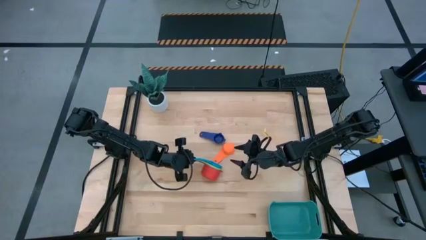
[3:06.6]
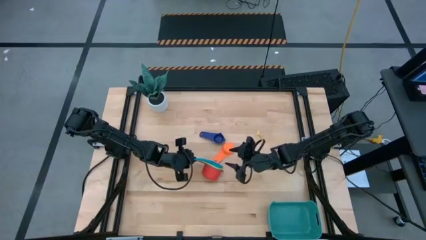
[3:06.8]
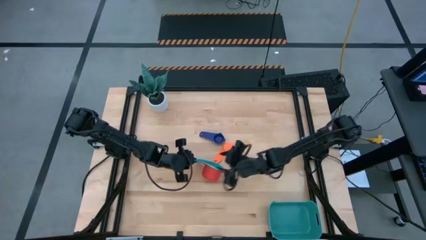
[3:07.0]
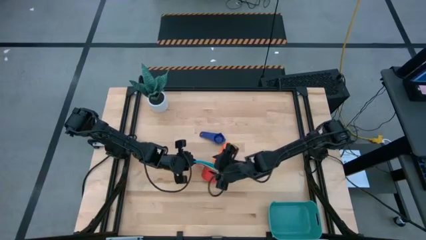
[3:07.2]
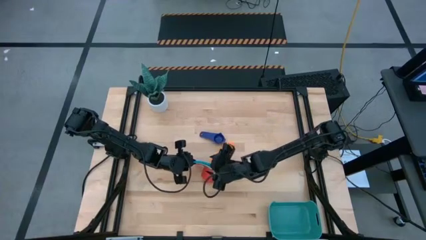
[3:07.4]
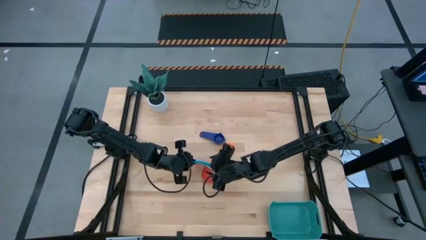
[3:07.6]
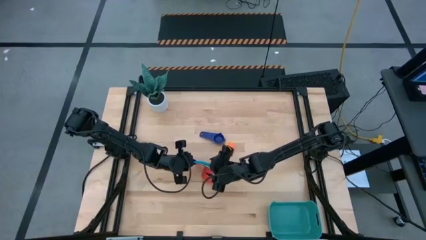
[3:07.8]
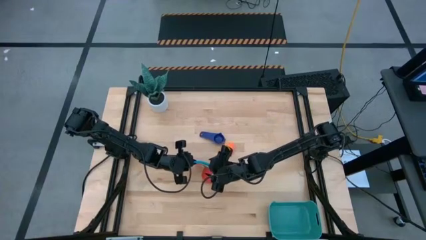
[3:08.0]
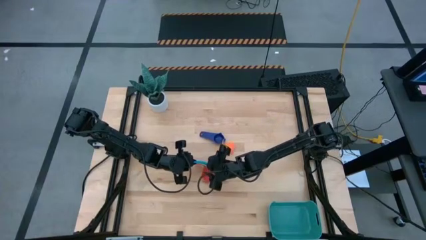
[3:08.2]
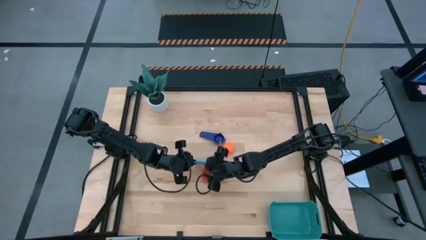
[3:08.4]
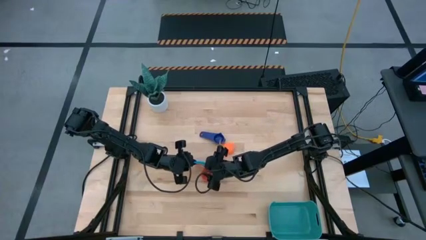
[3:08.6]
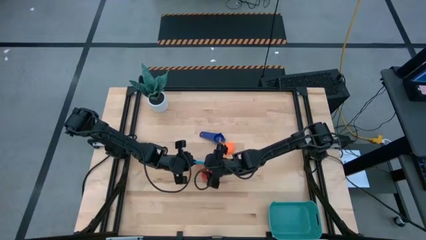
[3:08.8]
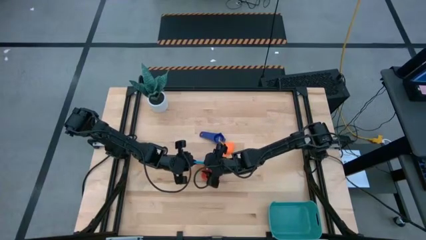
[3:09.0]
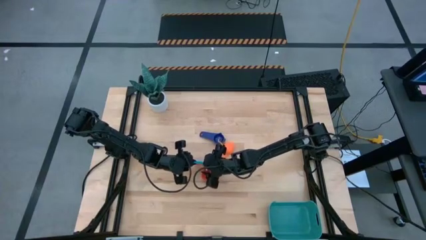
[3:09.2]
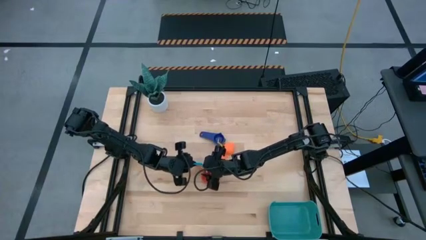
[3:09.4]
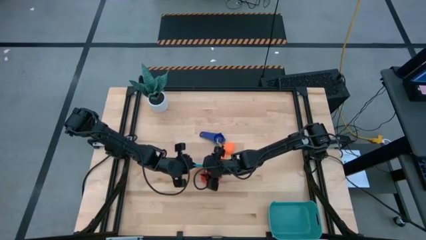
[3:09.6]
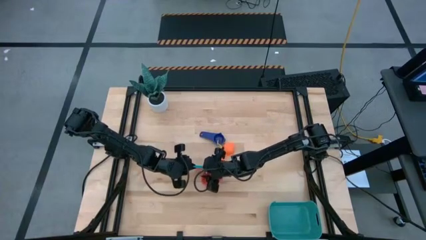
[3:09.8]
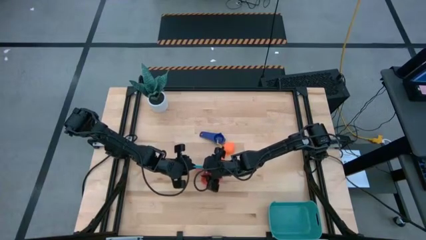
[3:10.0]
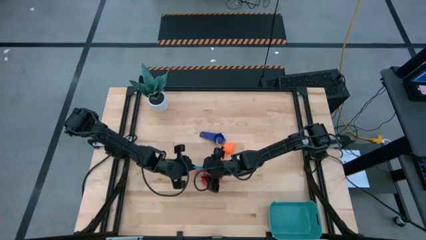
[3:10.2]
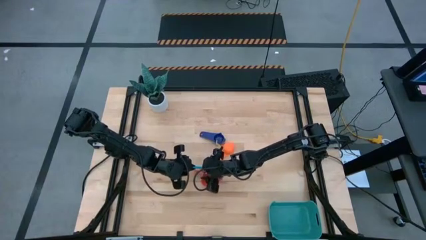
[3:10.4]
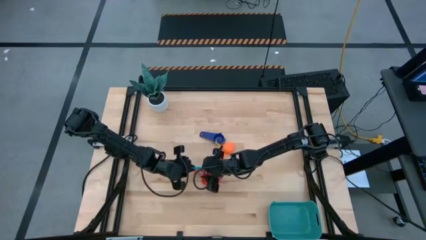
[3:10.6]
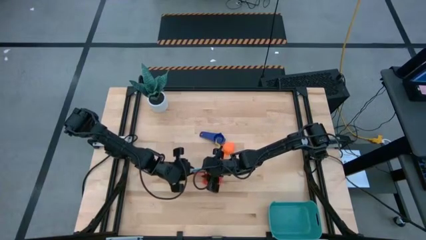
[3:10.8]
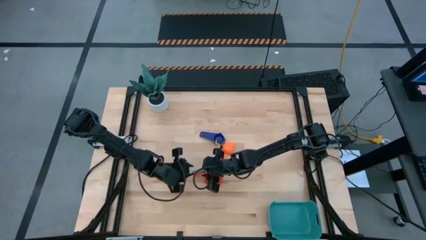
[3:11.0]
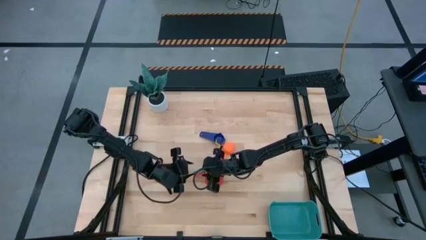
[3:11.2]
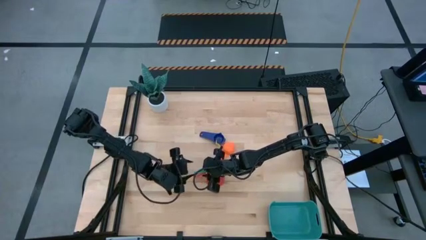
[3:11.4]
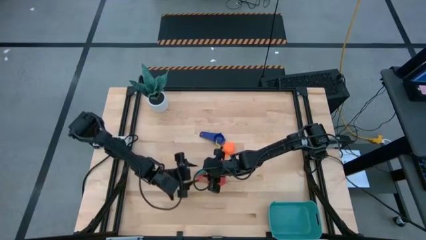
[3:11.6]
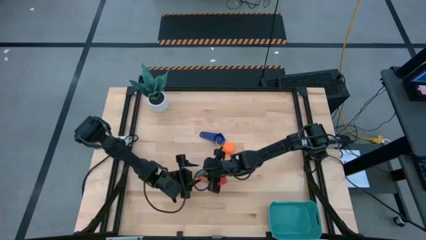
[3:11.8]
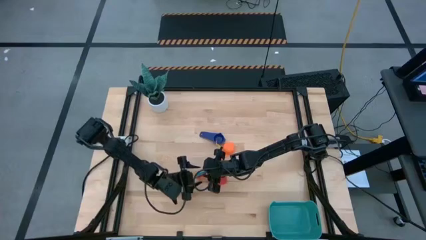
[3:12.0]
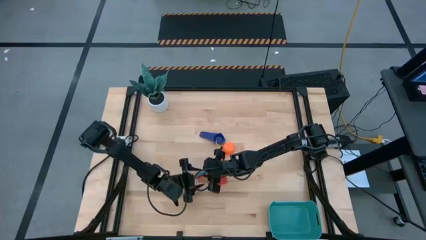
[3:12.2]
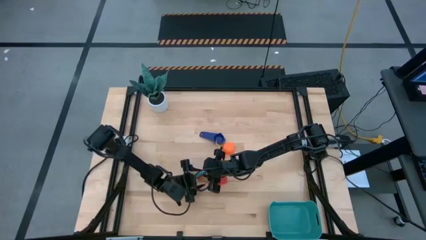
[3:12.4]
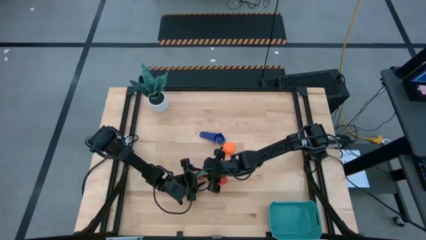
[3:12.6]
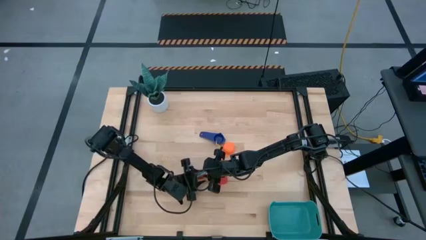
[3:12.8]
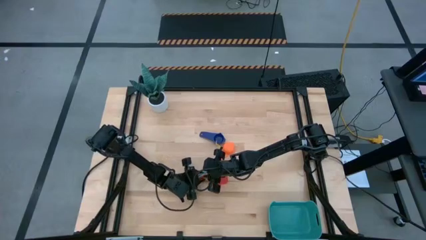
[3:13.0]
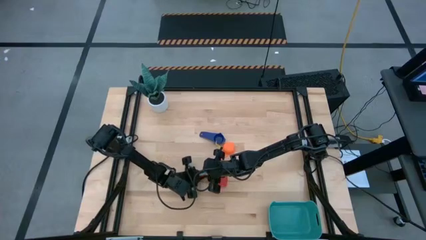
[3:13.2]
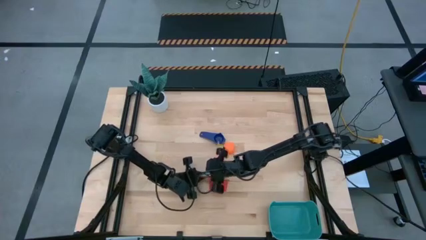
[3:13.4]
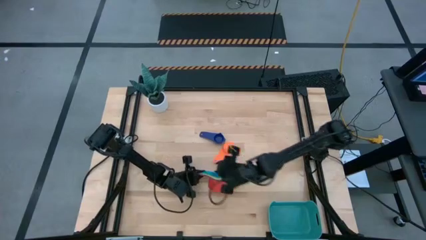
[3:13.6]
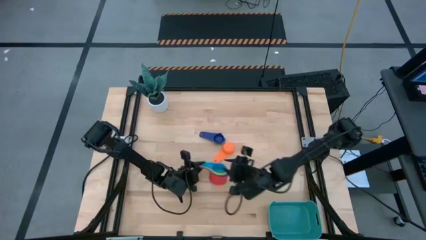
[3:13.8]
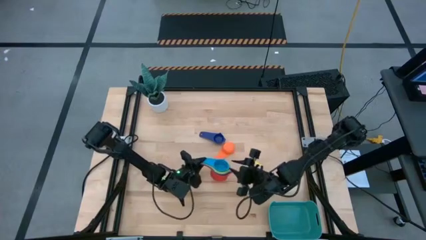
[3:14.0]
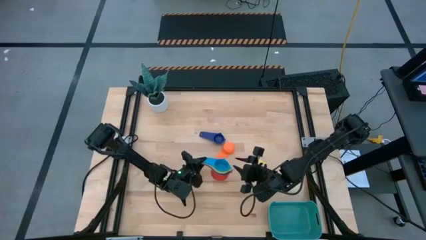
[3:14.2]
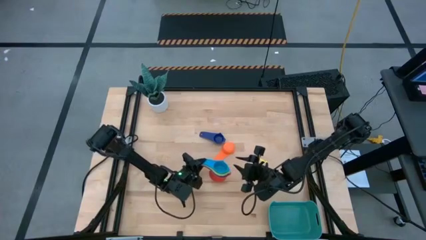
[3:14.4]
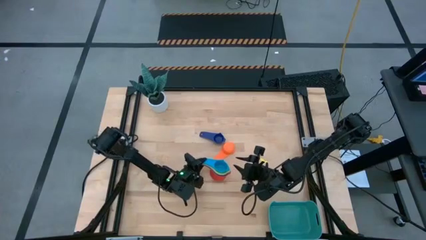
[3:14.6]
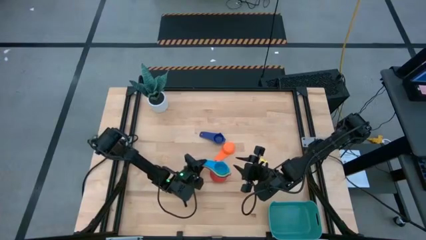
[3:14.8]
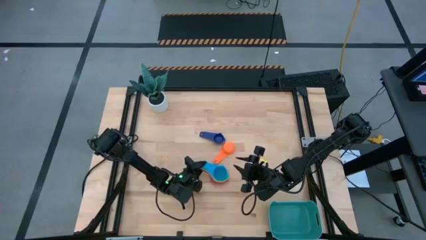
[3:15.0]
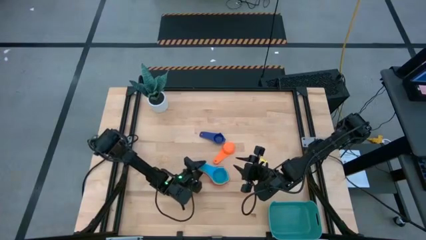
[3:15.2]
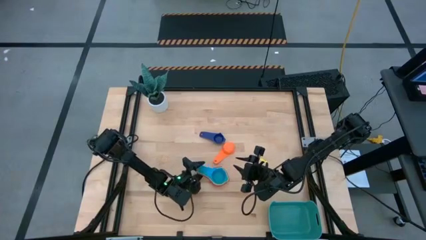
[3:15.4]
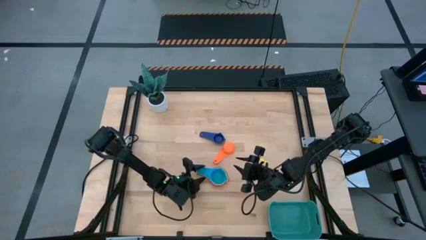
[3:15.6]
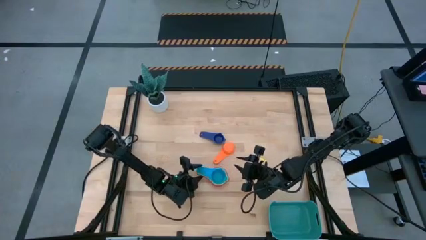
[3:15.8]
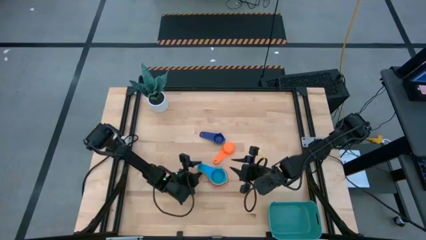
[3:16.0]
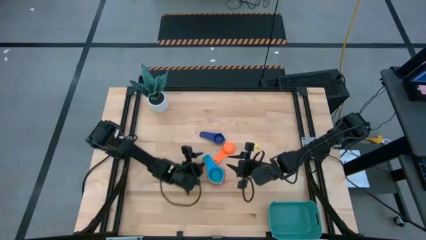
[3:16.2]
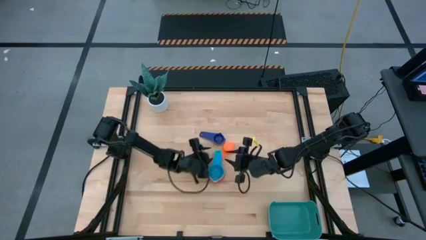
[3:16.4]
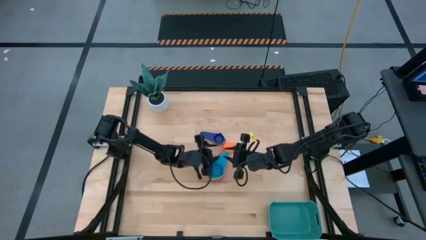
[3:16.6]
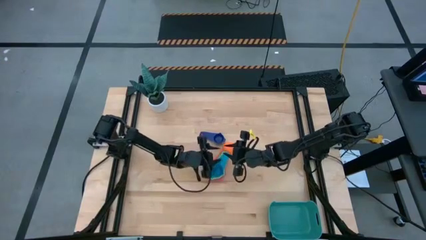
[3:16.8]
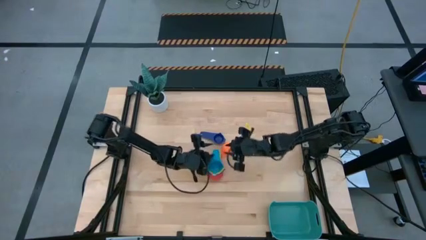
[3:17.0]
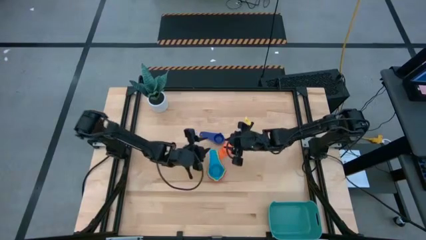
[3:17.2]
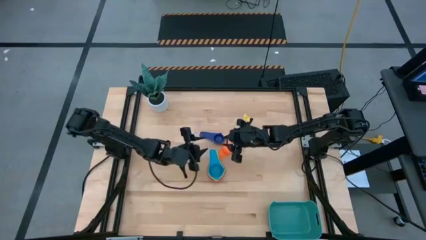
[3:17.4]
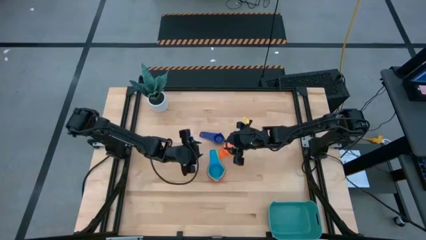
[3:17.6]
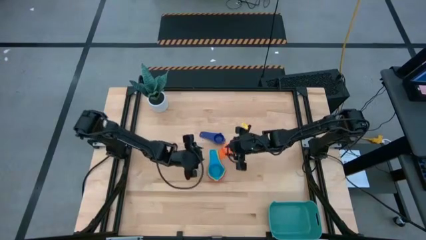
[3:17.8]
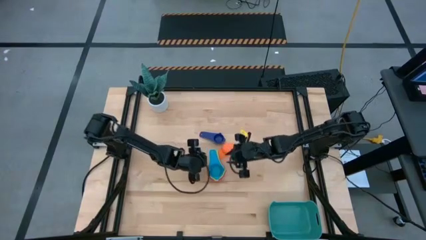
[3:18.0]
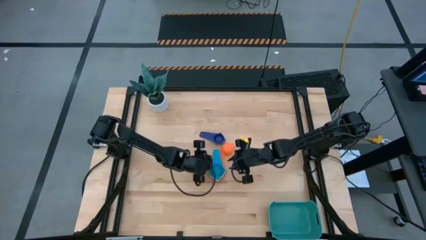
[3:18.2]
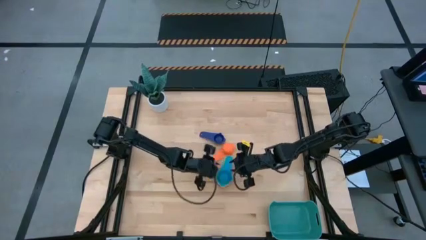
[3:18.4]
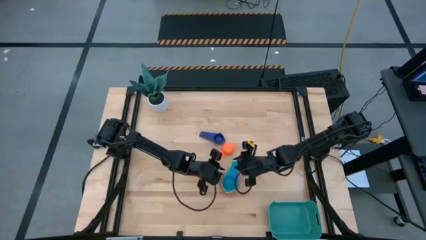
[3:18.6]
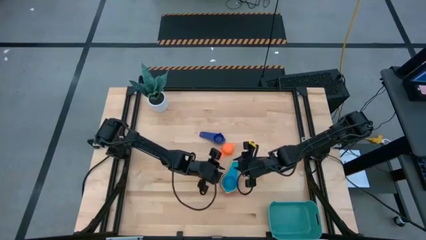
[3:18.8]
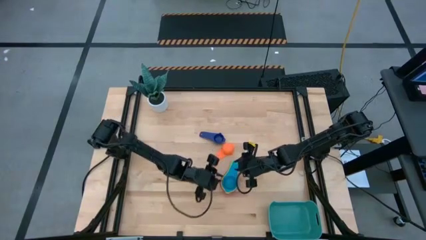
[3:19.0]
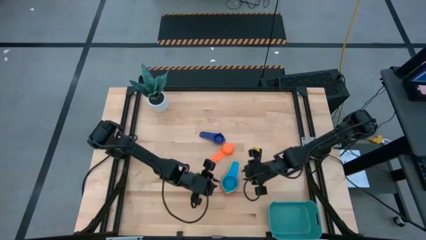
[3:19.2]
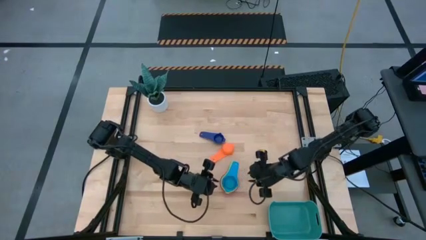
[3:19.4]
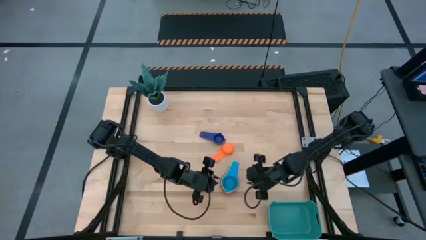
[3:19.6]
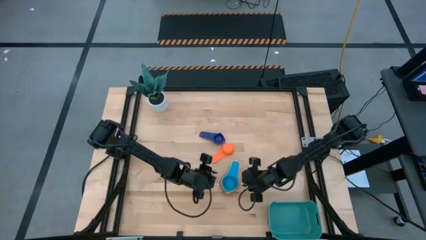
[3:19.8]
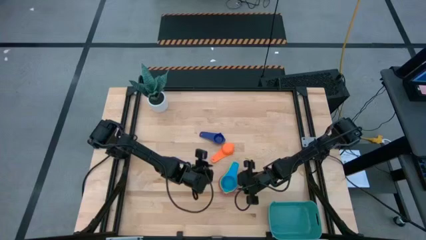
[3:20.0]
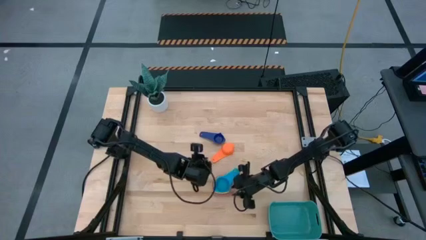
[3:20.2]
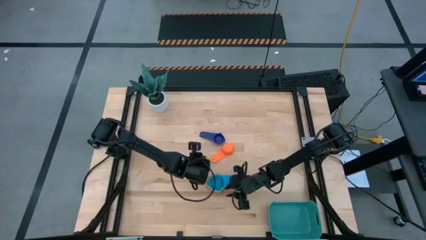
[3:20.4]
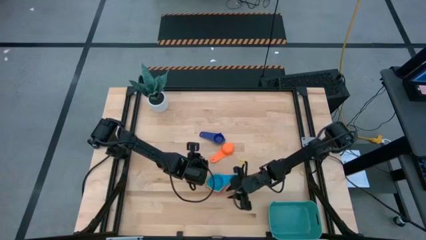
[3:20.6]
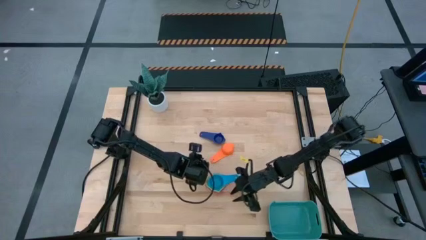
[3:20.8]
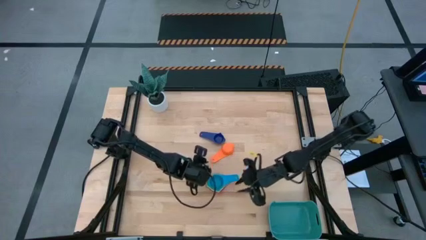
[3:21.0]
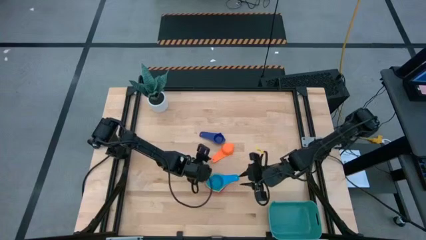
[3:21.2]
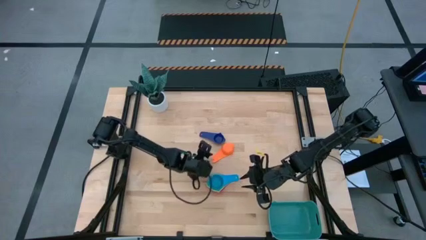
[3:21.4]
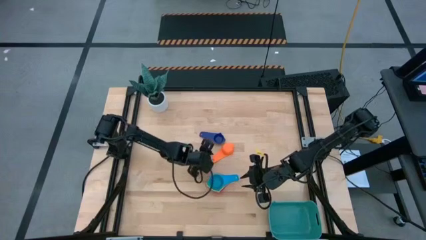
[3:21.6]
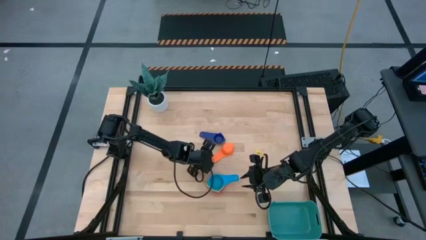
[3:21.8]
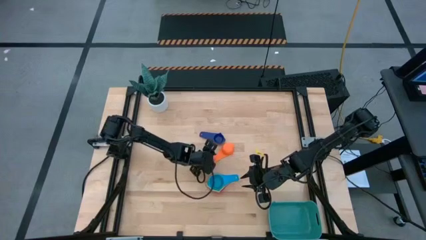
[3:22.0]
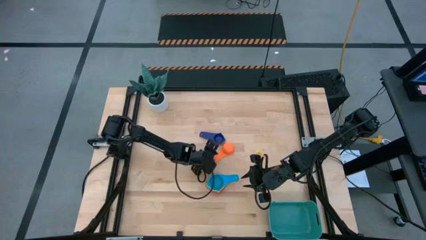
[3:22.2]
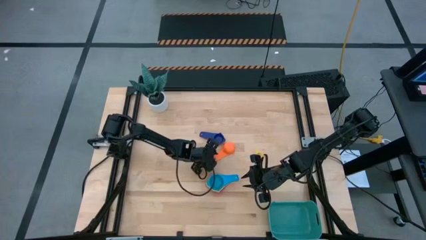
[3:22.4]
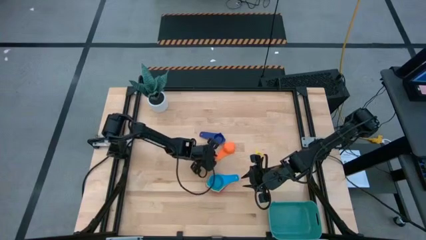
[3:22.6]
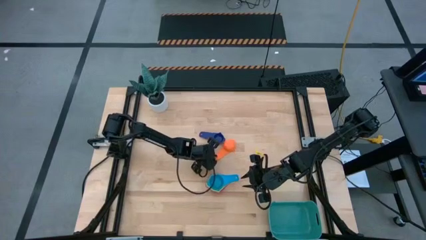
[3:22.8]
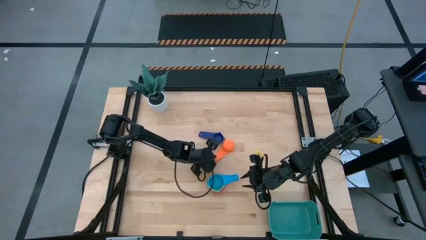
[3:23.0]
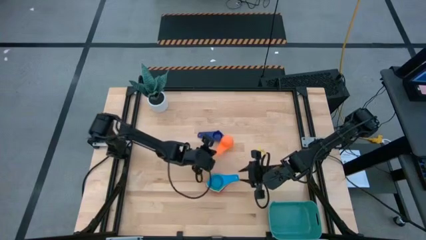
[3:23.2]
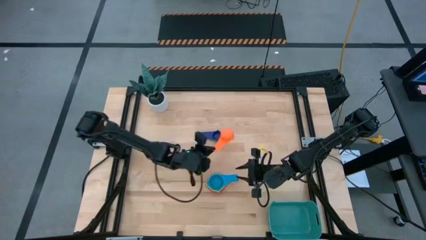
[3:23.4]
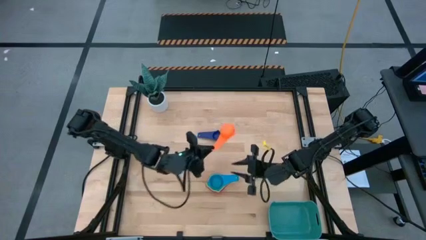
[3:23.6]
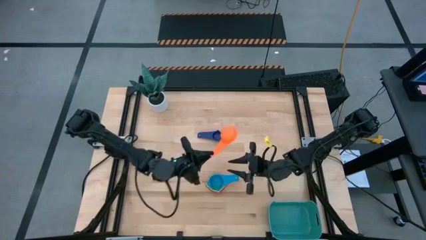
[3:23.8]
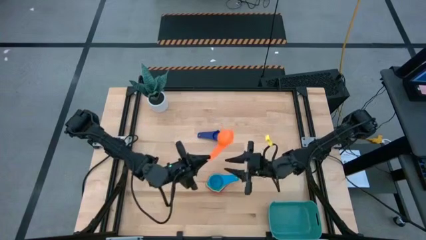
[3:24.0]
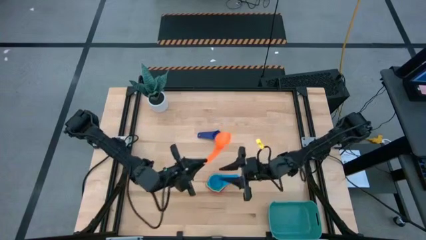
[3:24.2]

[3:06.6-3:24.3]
Task: Nest measuring cups in basket
Stack the orange measuring cup on top of the light blue measuring cup
